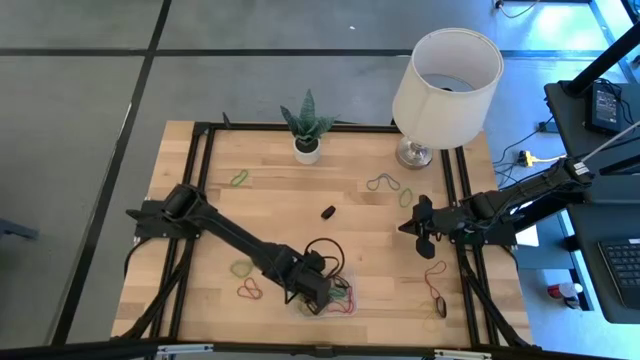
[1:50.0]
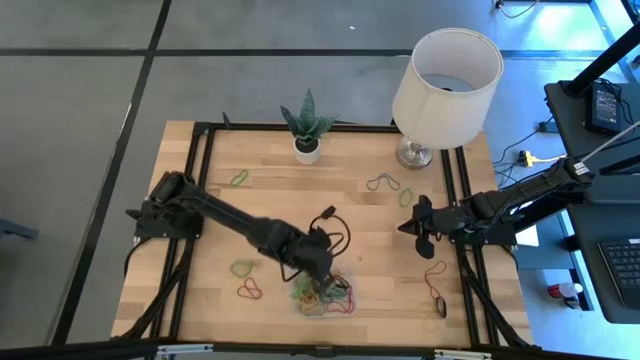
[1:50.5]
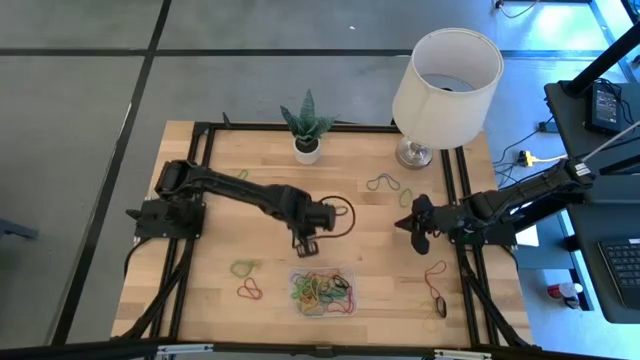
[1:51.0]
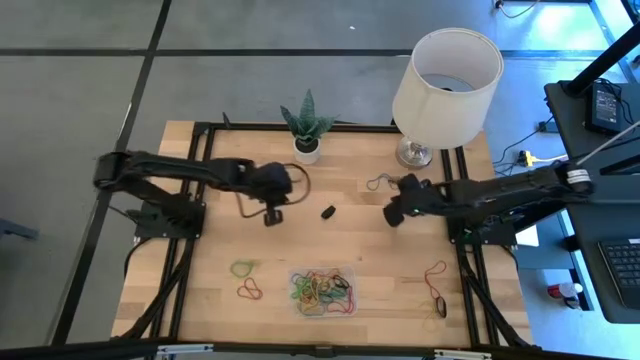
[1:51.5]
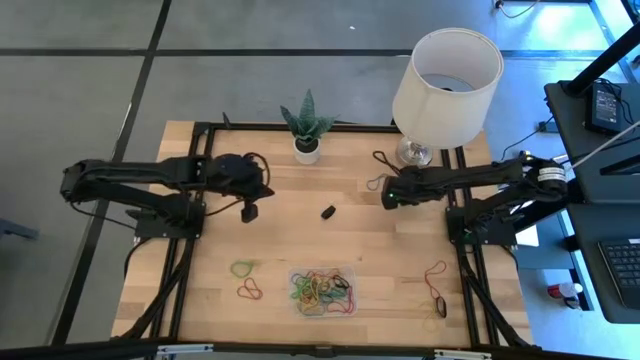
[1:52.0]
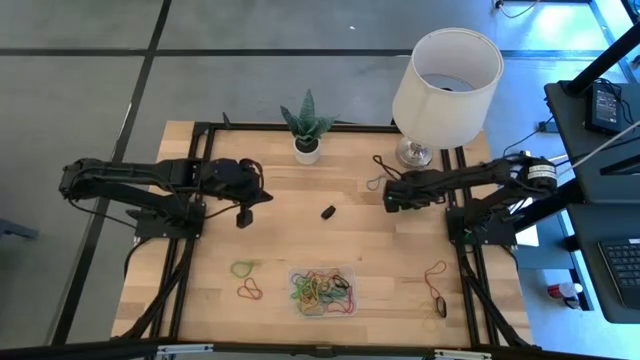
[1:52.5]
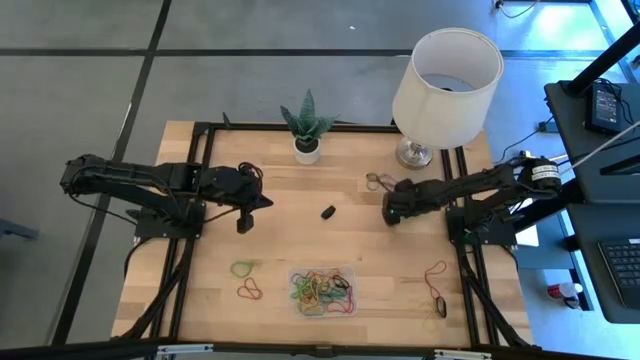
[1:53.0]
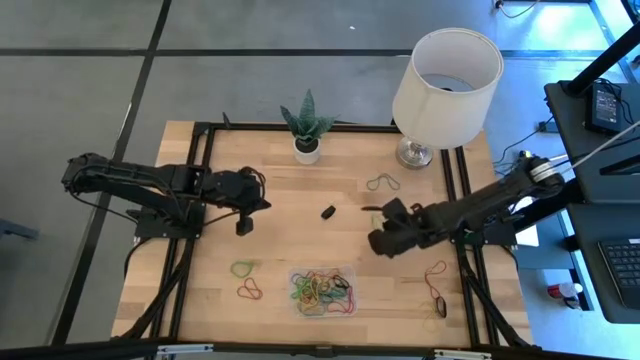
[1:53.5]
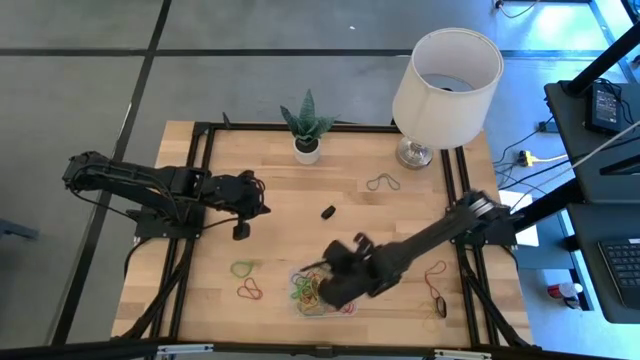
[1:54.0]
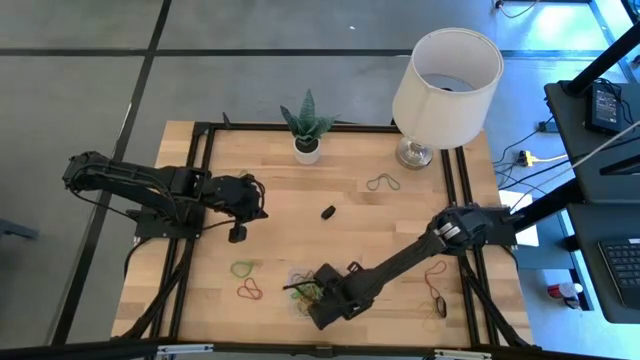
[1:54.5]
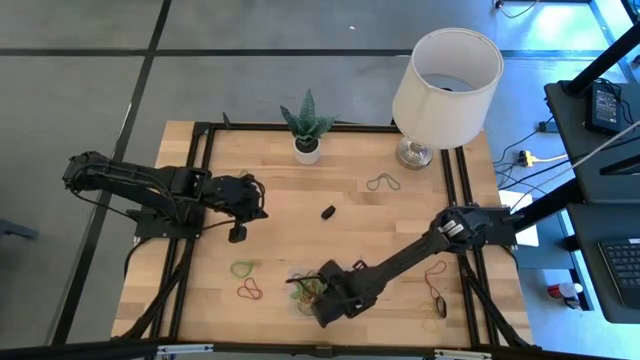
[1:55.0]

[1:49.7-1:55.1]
Task: Pick and place rubber bands into bin
Put the green rubber band into the transparent bin

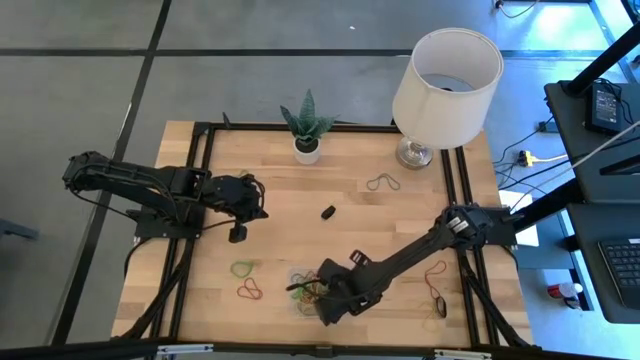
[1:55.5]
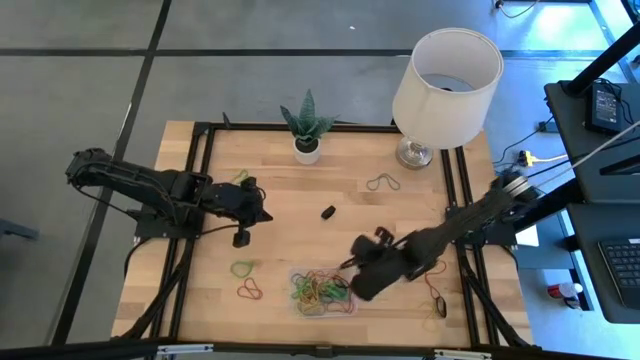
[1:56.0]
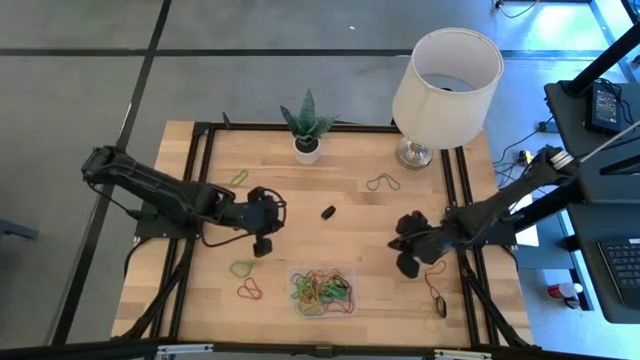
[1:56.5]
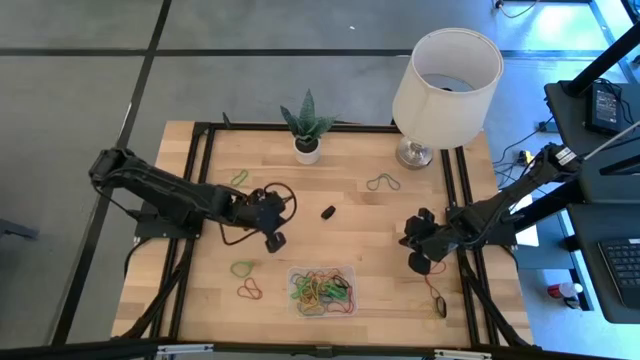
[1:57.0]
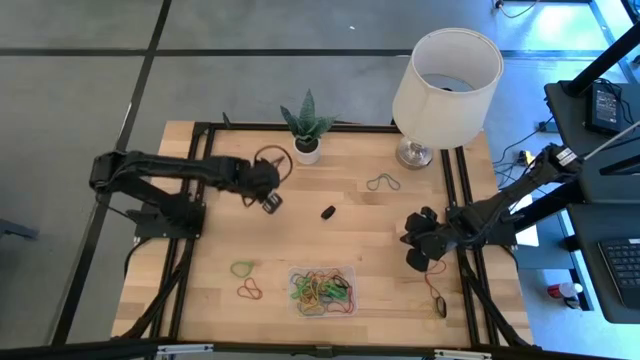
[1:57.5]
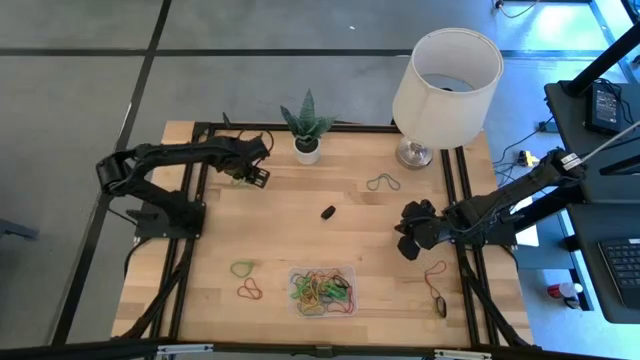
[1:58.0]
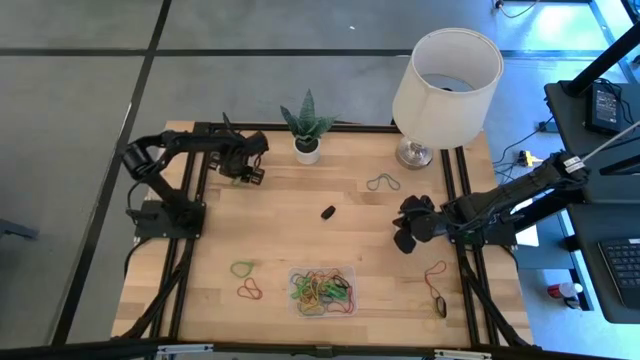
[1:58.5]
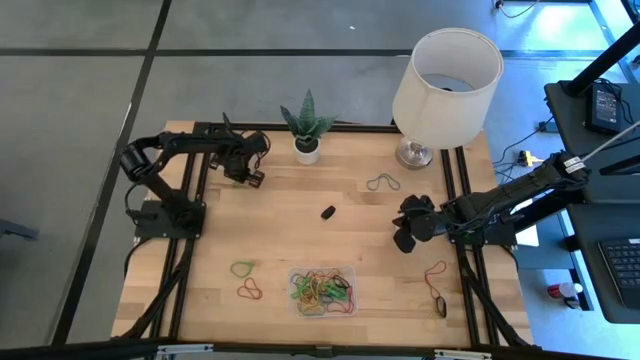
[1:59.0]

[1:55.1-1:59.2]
Put the green rubber band into the transparent bin

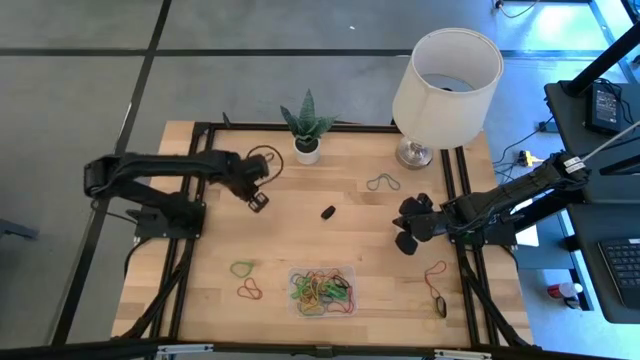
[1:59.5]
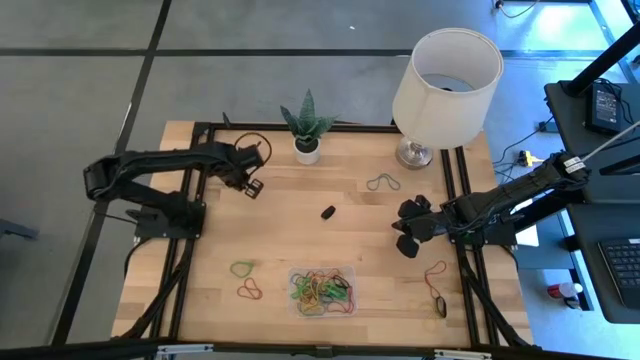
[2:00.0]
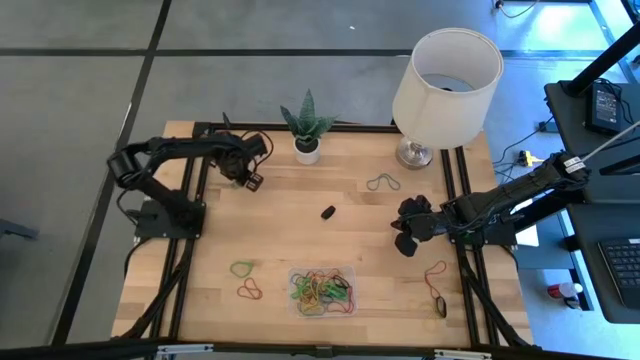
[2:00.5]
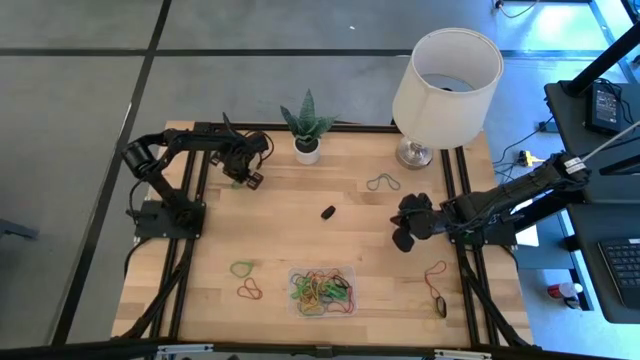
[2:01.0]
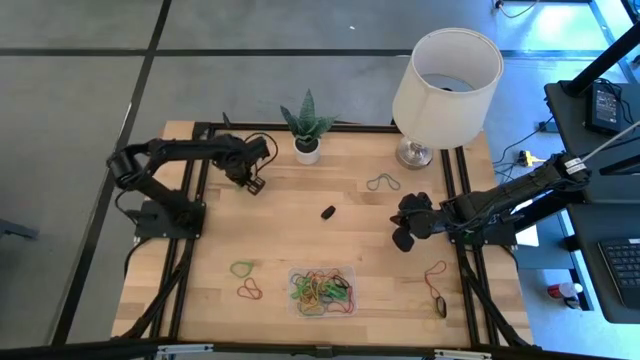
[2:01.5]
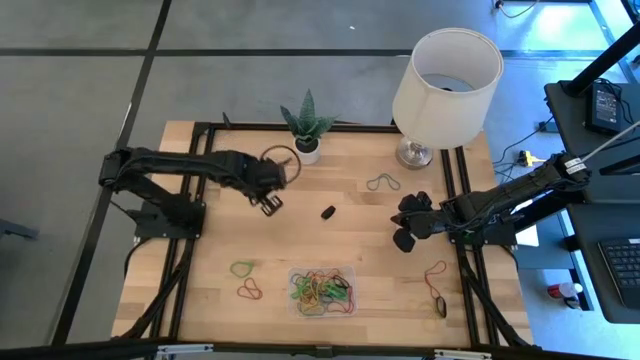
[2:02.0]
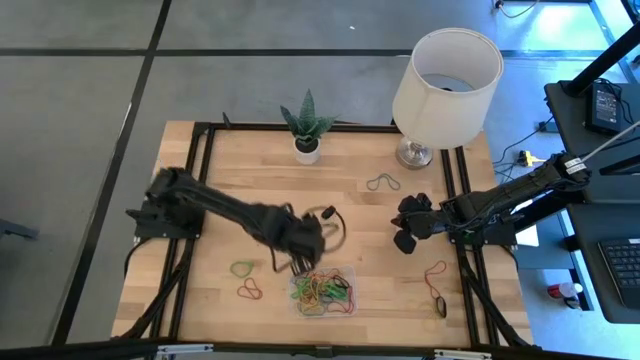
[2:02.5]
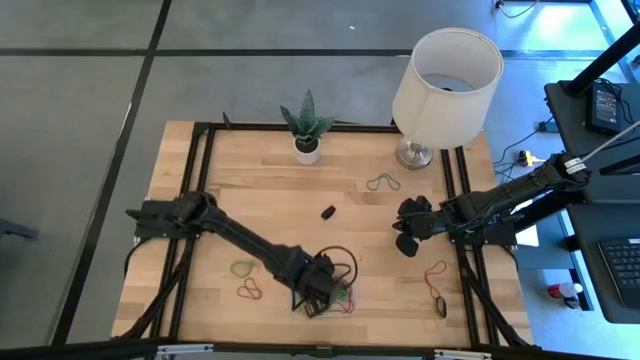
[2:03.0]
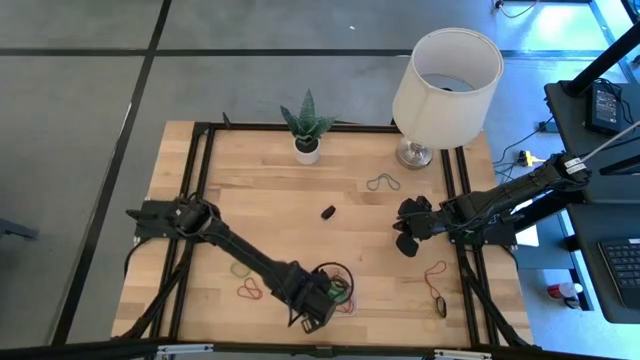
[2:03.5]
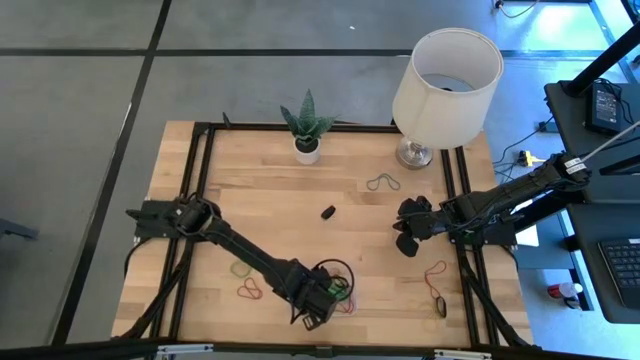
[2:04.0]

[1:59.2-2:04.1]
Put the green rubber band into the transparent bin

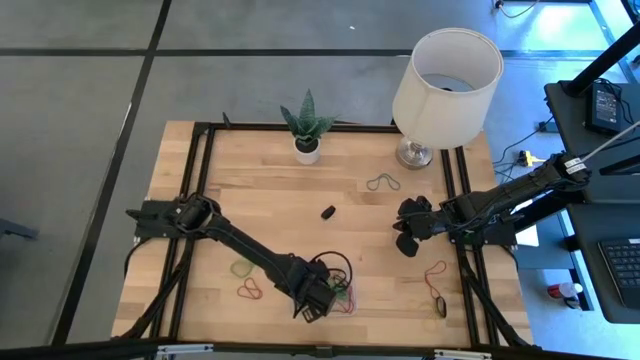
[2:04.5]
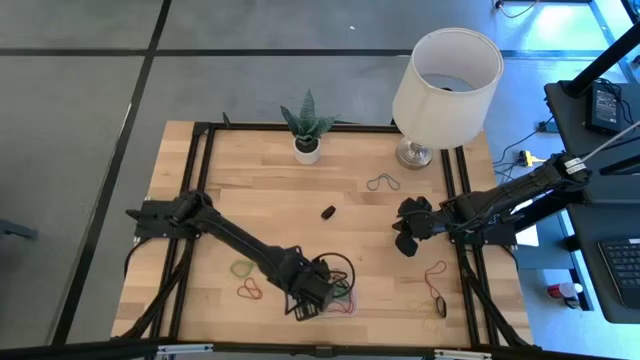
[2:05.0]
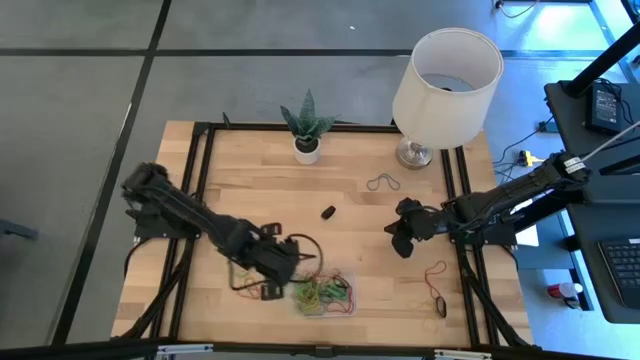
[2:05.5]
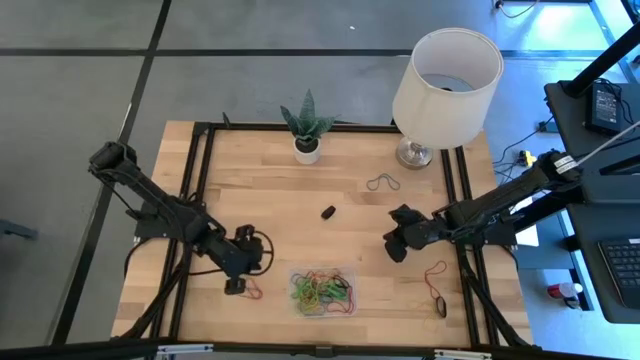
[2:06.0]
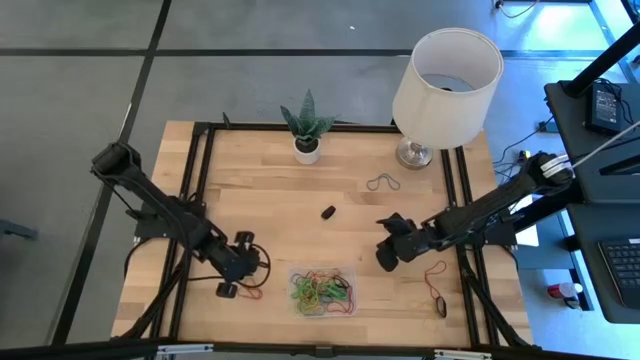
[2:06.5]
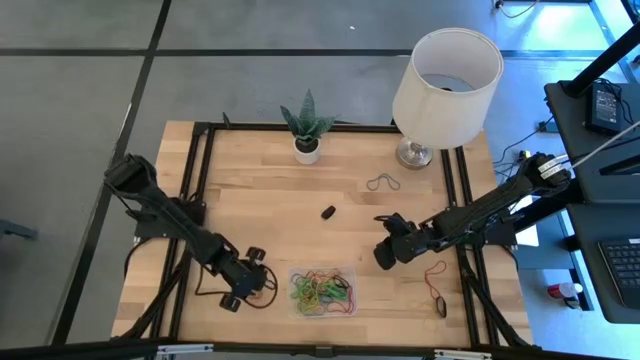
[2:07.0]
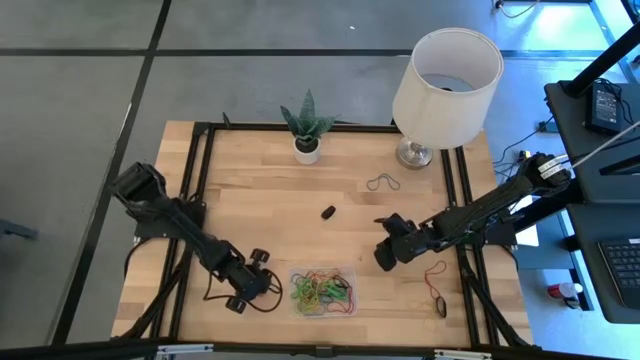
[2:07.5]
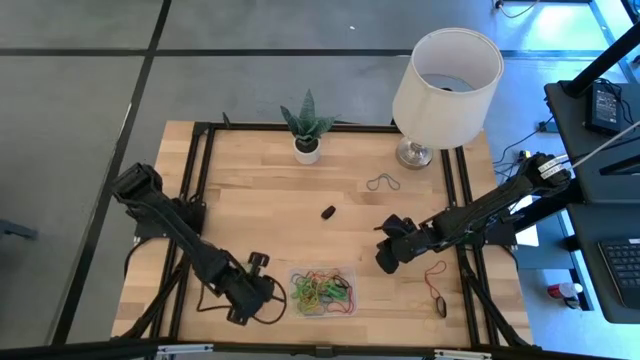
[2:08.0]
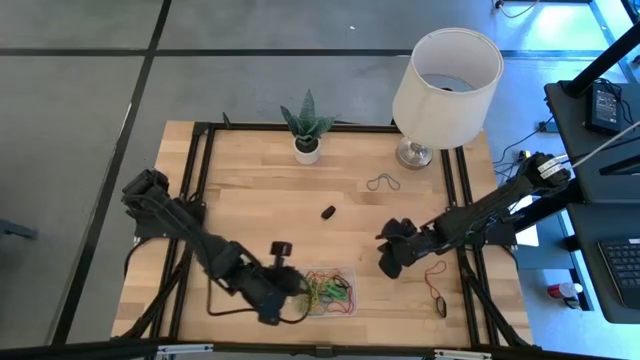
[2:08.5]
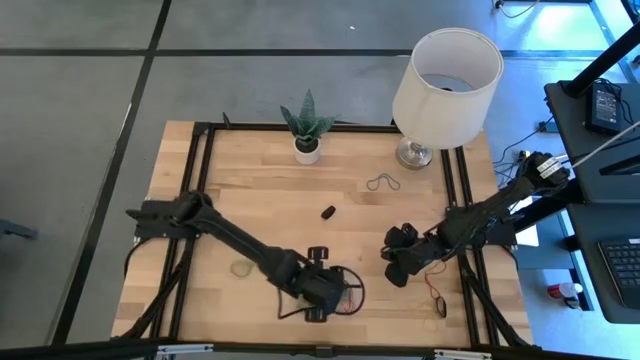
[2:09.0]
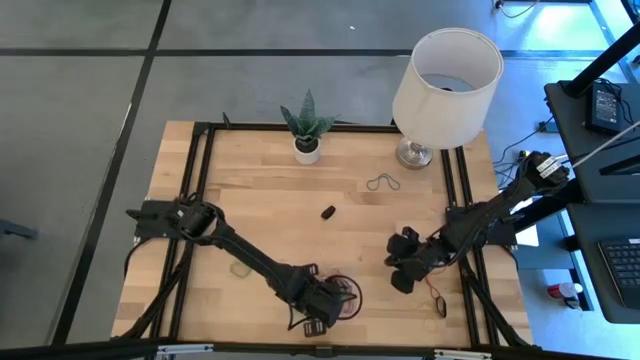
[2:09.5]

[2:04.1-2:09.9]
Put the red rubber band into the transparent bin

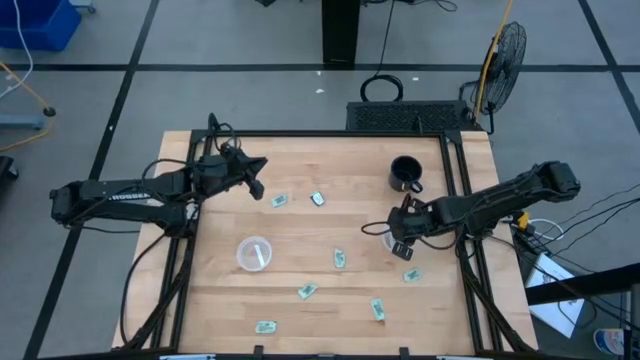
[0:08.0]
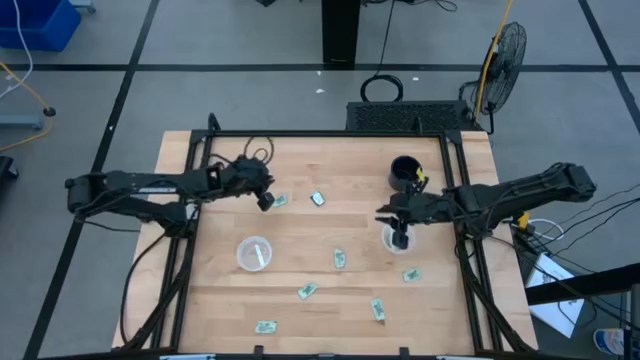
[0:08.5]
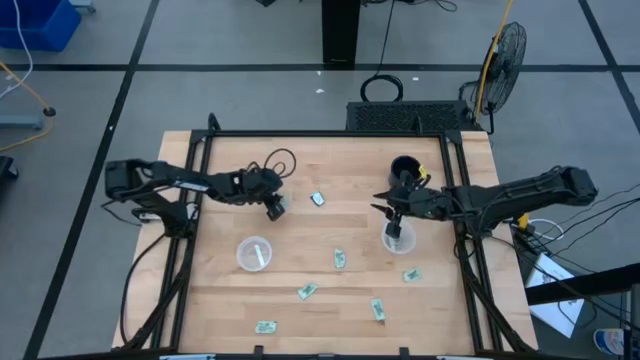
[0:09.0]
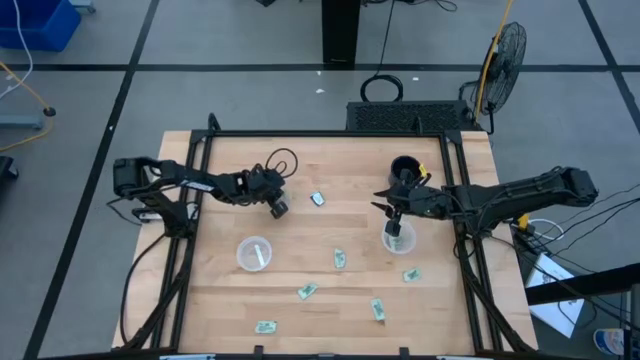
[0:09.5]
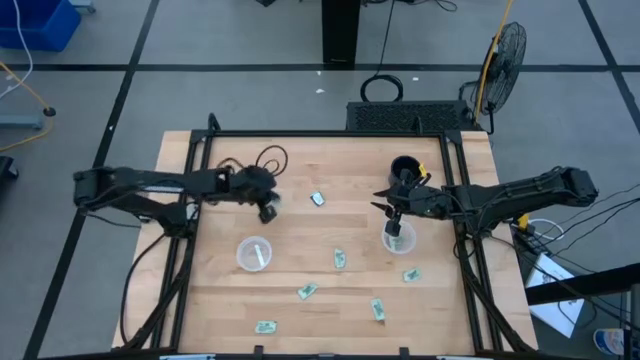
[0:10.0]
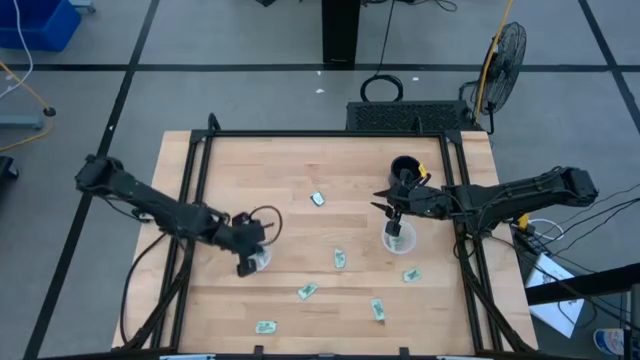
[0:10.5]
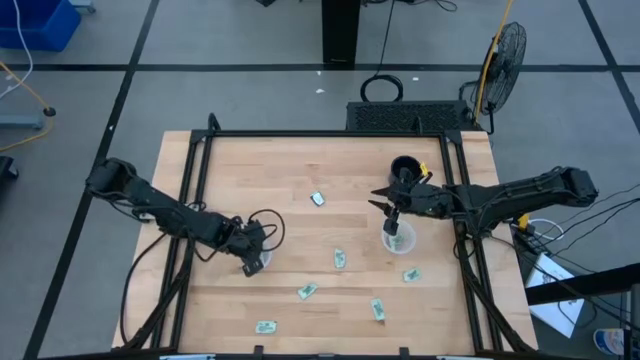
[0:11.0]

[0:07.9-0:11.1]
Task: Pick and place items into bin
Put the white stevia packet into the left transparent bin
